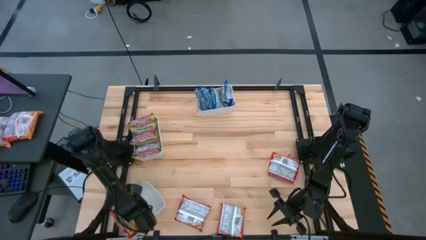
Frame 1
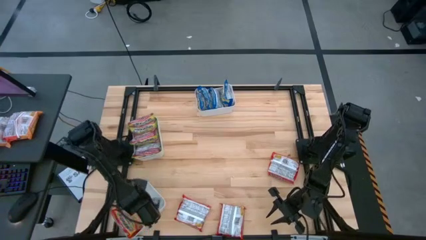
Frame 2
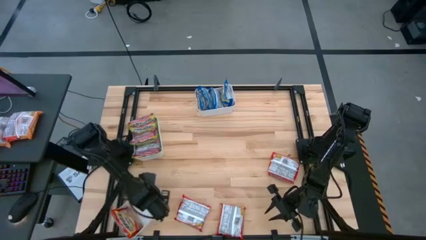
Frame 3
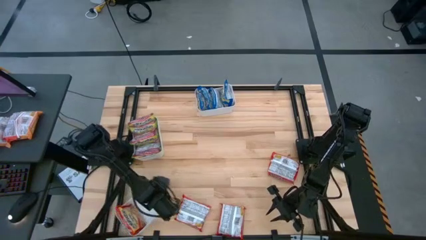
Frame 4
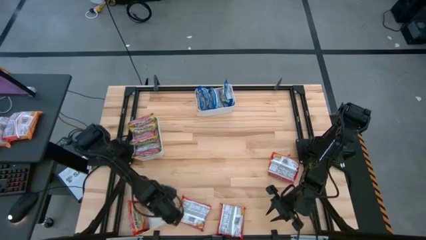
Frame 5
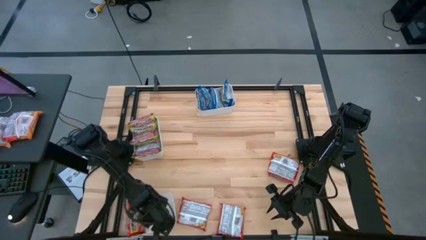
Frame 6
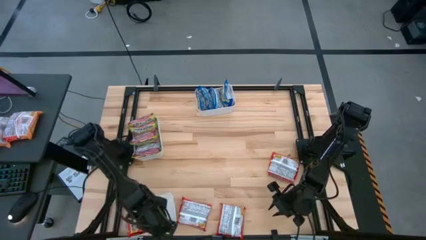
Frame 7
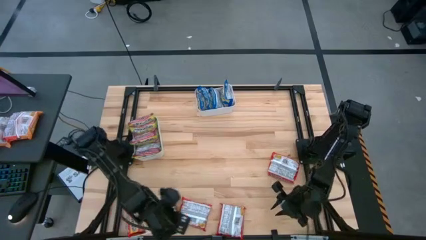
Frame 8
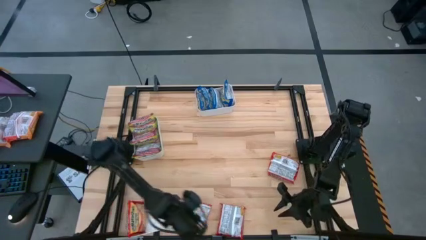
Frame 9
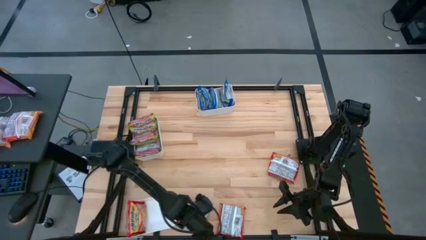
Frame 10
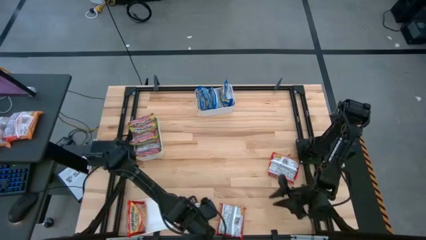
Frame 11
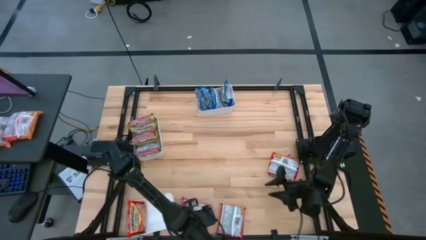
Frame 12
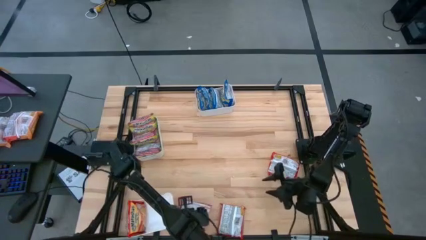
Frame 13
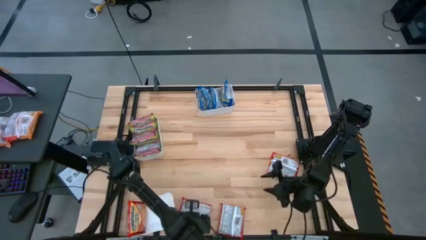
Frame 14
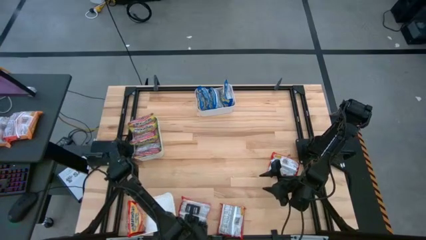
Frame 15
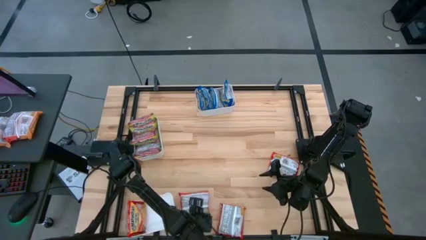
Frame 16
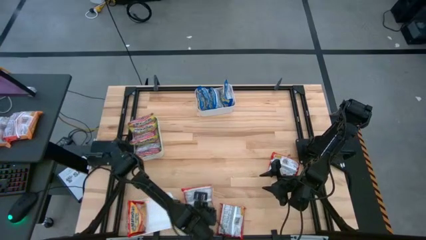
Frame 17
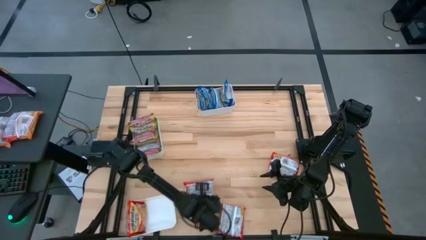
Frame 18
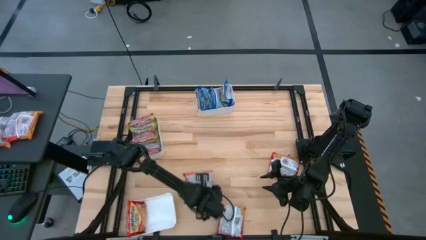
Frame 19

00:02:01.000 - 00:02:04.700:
Task: Sort Maruchan noodles
Put the red noodle pack into the bottom white bin

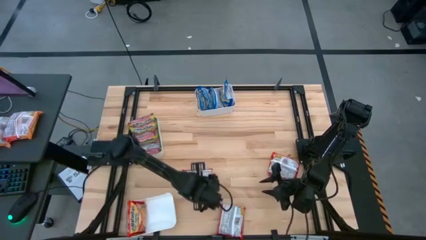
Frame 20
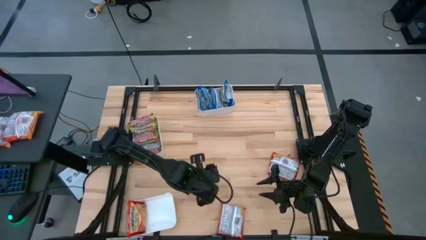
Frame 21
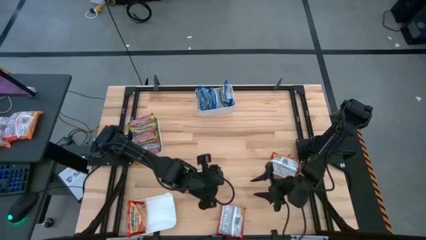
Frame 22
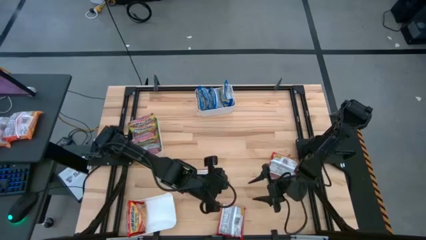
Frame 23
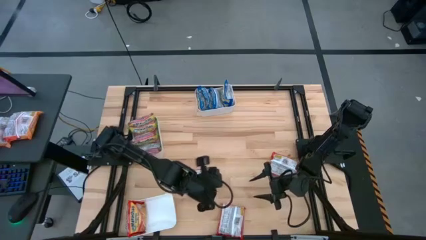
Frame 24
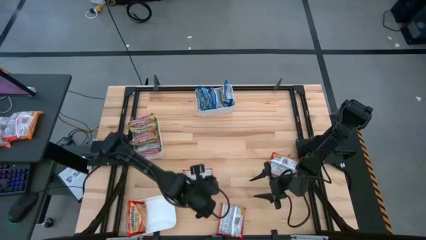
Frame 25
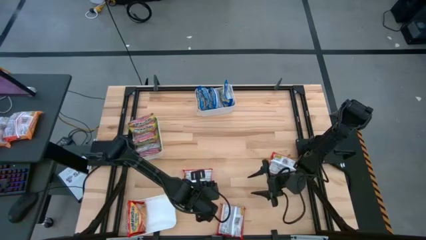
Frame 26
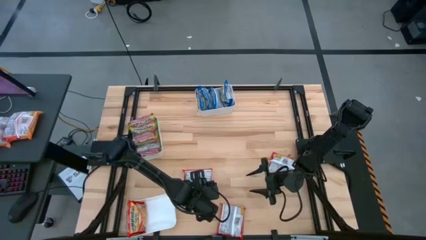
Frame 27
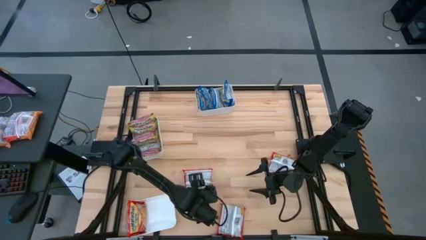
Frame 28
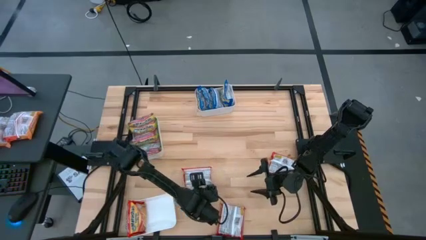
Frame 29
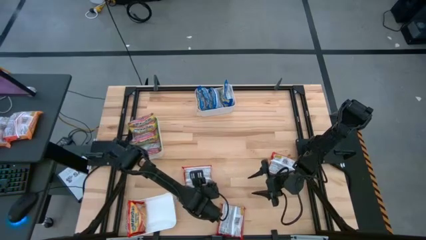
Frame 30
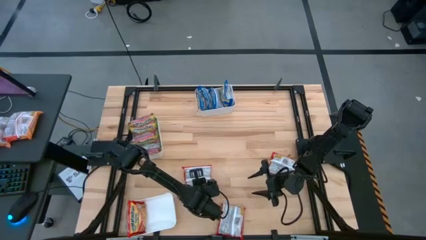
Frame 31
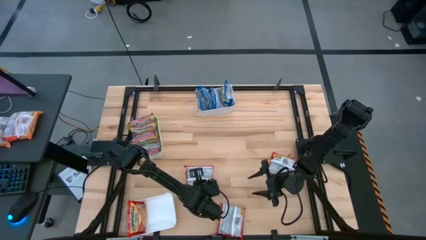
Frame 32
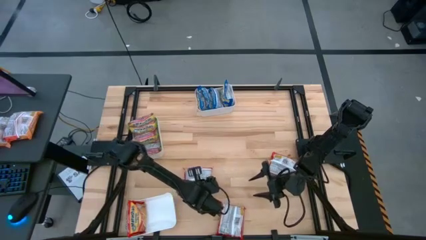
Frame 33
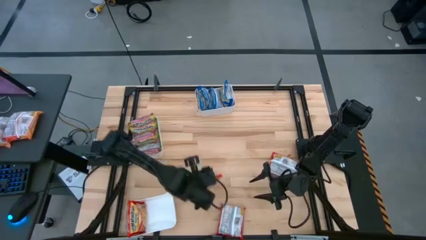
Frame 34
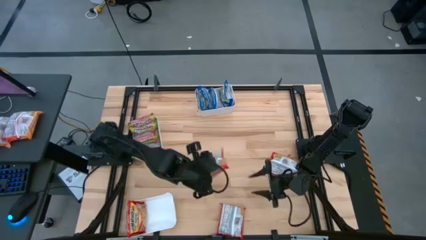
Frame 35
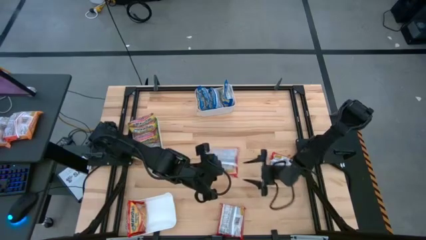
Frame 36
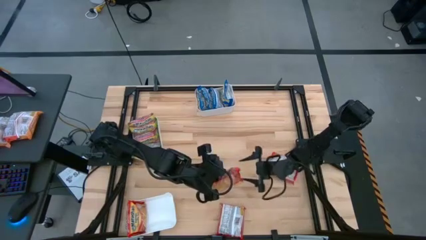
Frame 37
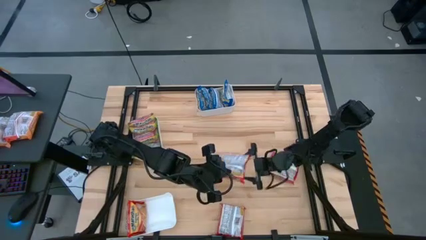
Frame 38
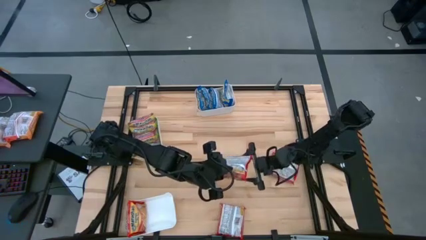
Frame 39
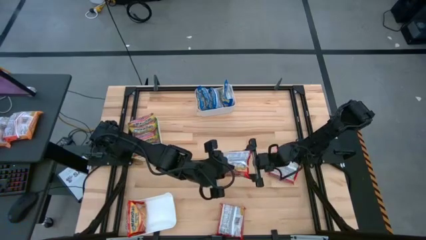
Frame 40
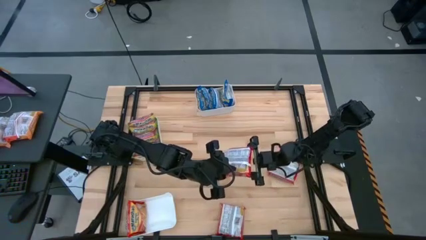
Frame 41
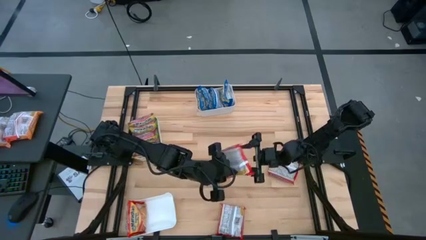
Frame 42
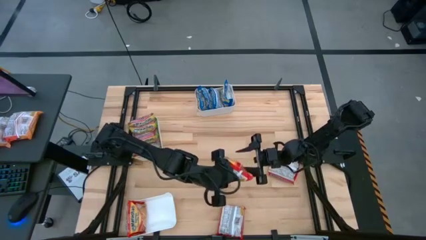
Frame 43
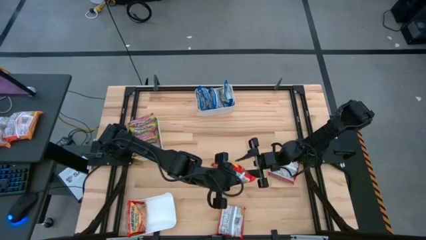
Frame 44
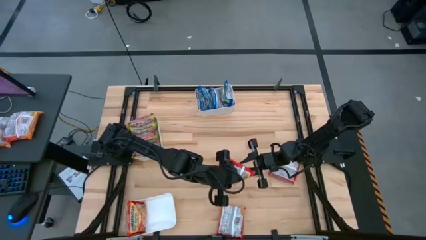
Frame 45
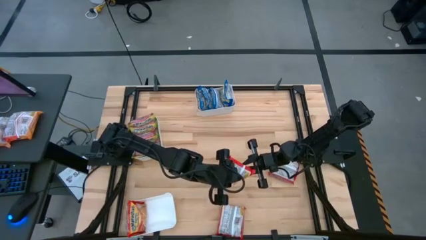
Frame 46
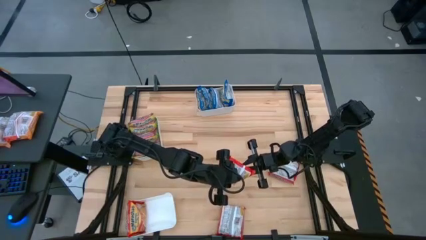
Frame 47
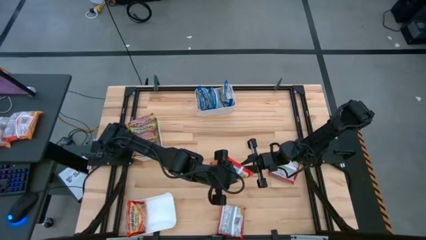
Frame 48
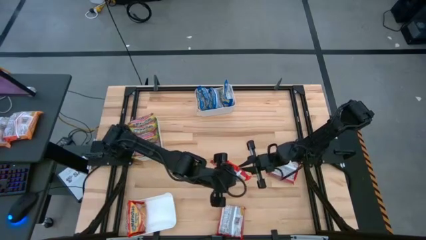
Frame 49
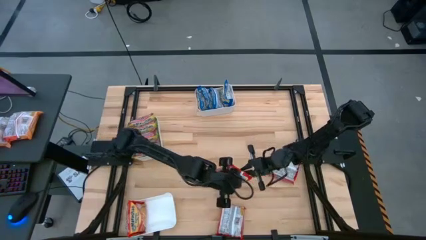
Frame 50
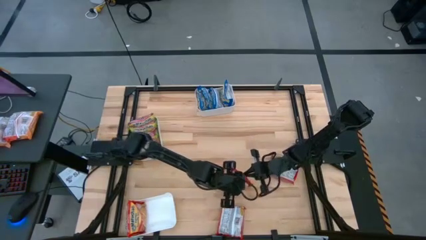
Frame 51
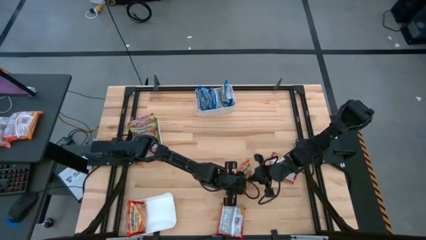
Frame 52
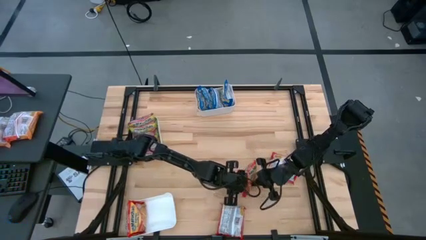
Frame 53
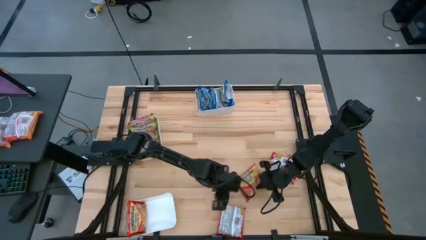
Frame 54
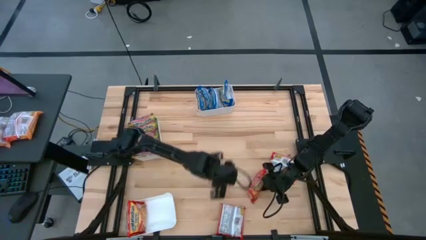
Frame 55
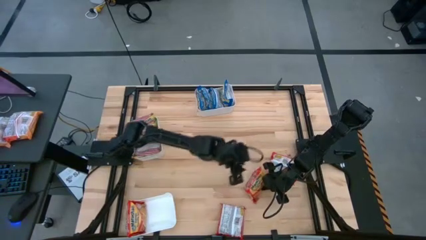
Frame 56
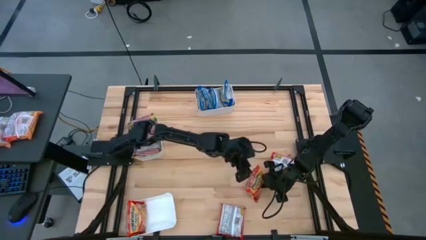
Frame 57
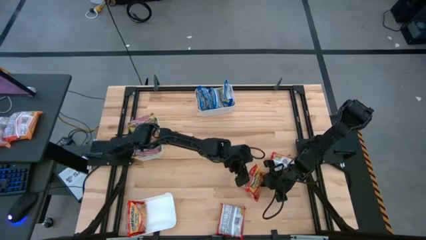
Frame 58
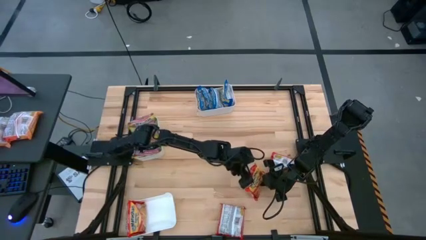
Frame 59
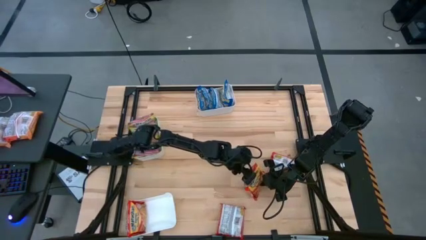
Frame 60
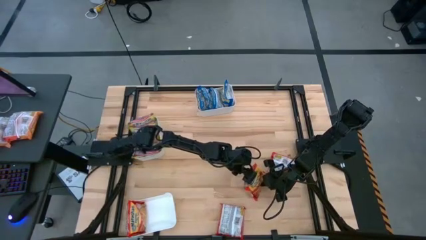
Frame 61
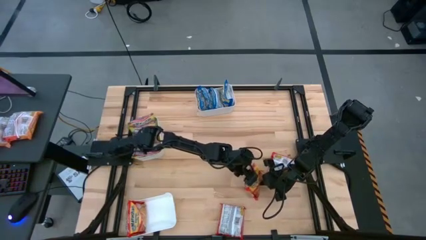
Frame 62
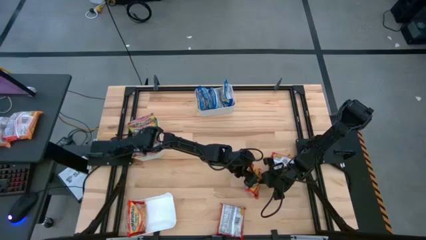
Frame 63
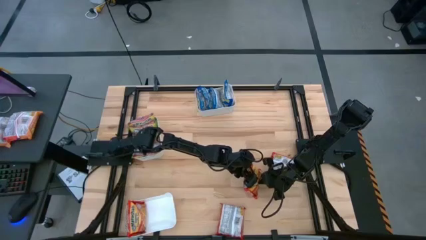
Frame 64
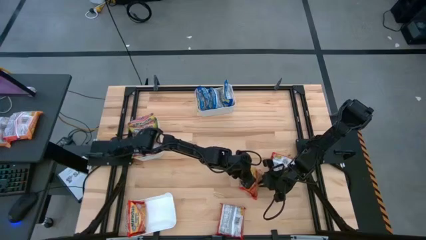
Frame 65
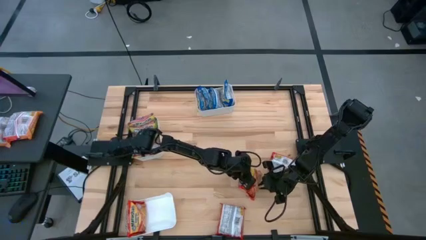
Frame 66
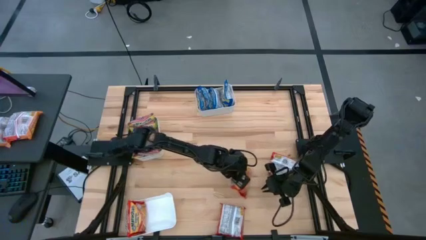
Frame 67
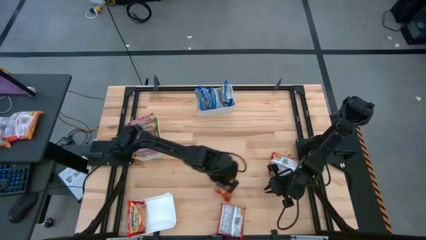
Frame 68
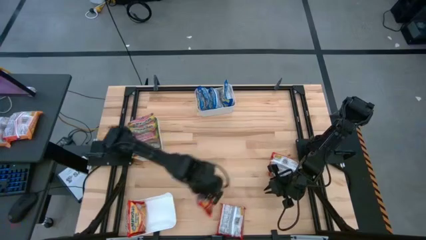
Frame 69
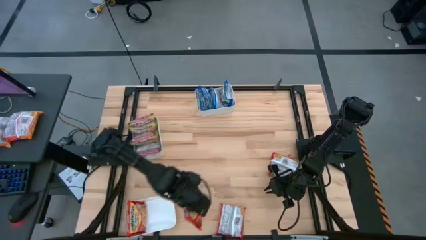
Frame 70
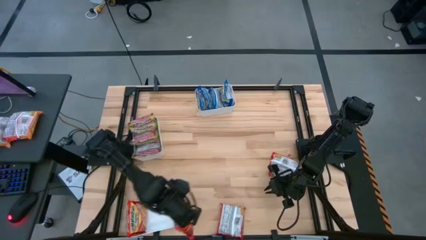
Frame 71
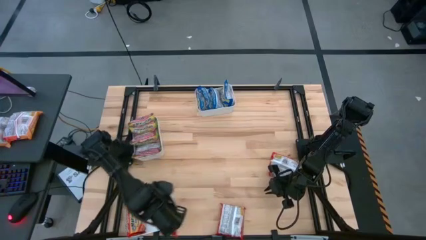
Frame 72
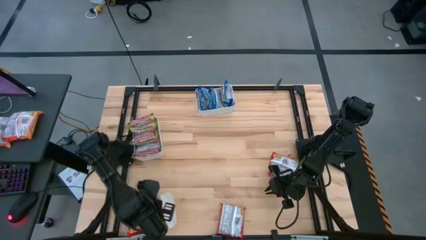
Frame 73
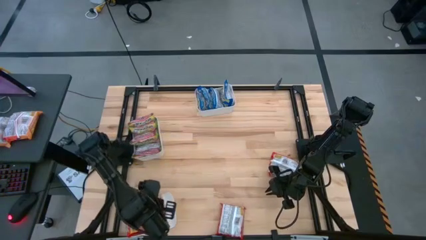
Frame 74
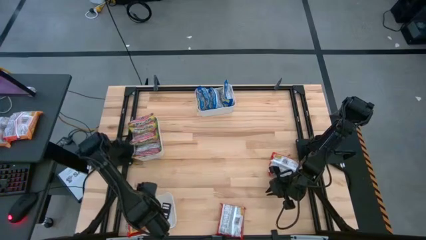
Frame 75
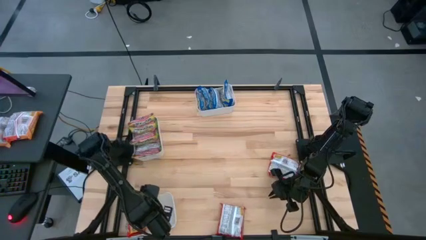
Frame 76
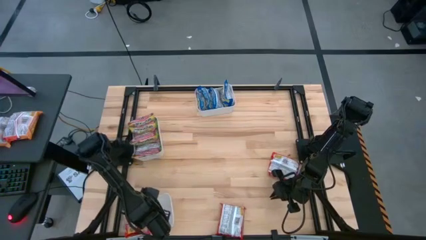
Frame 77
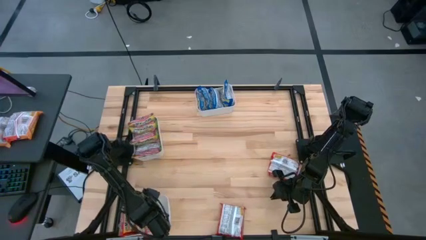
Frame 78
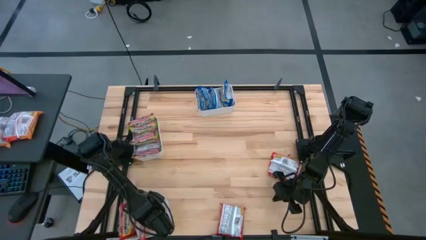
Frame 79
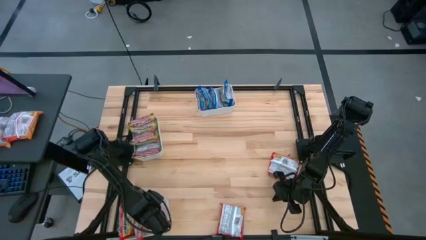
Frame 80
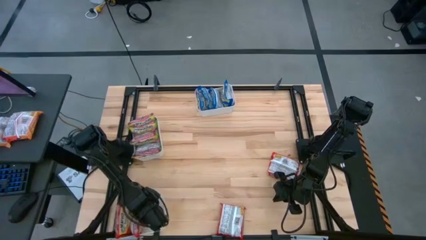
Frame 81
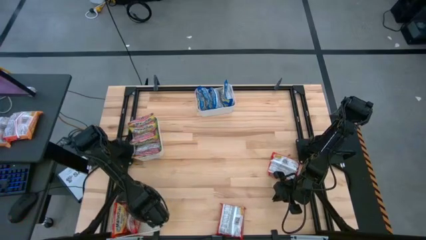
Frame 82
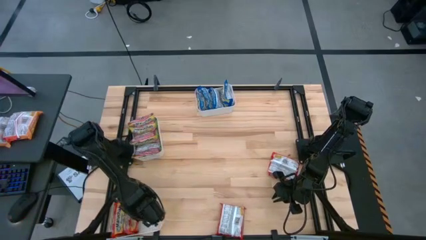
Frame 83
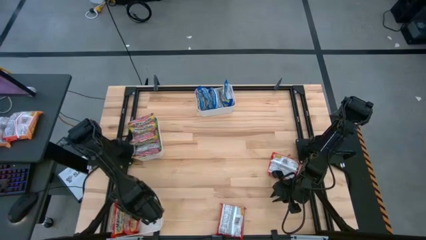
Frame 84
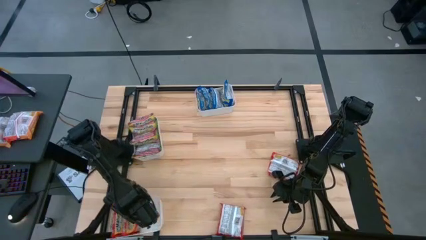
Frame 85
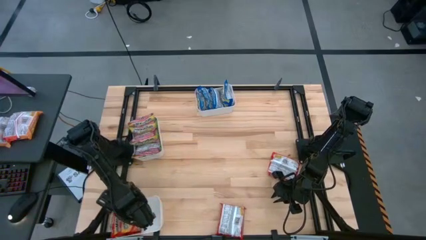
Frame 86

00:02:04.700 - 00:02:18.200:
Put the red noodle pack into the bottom white bin
